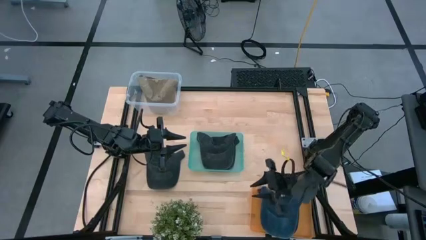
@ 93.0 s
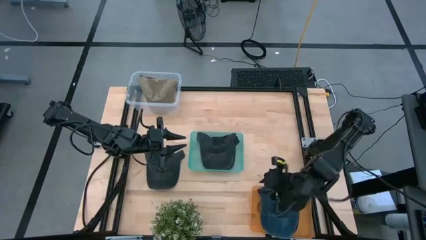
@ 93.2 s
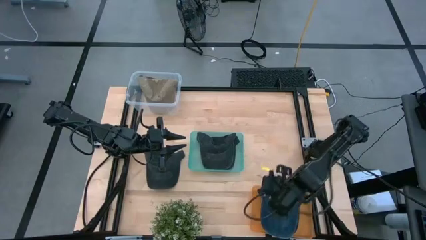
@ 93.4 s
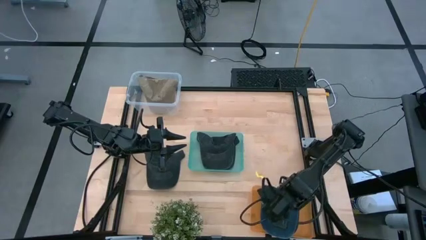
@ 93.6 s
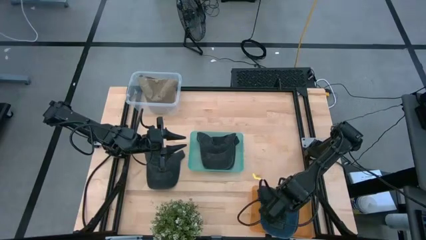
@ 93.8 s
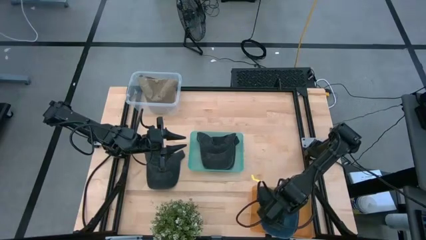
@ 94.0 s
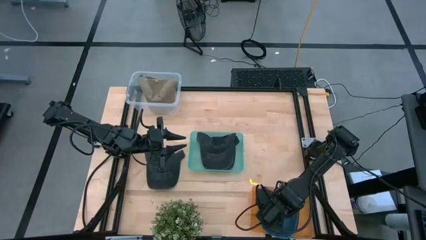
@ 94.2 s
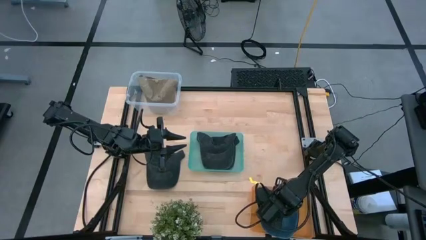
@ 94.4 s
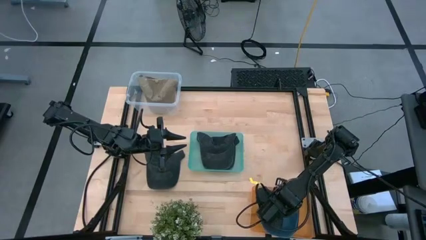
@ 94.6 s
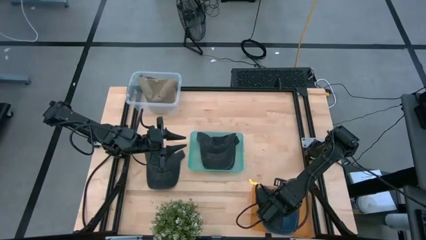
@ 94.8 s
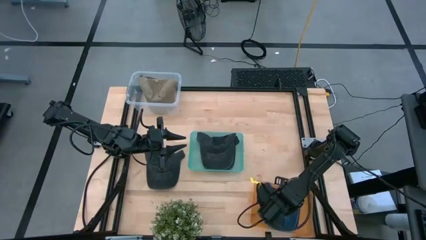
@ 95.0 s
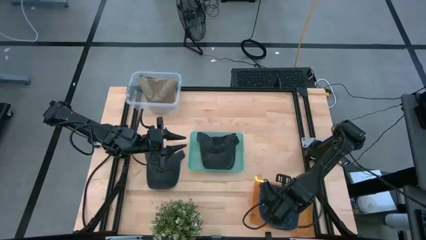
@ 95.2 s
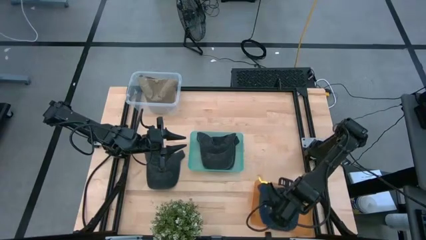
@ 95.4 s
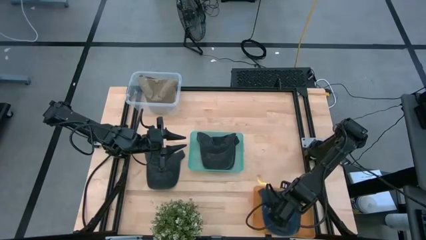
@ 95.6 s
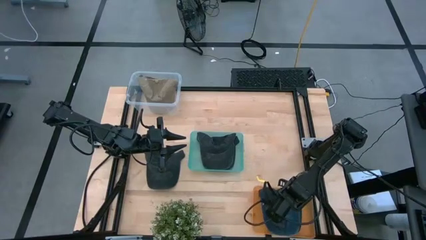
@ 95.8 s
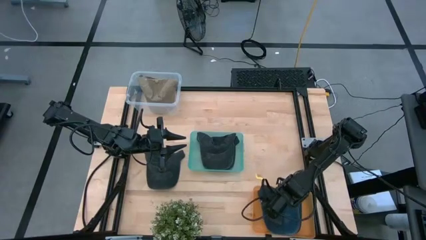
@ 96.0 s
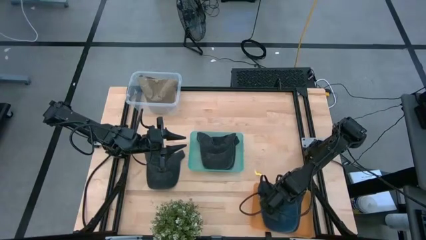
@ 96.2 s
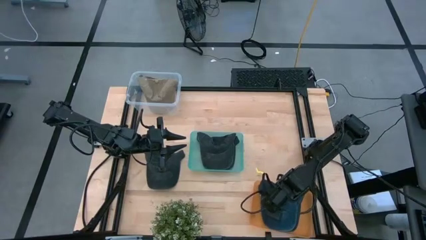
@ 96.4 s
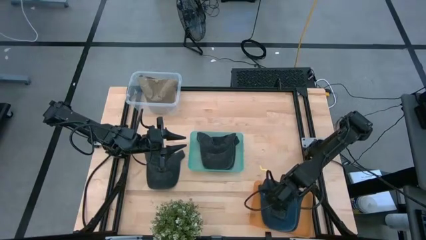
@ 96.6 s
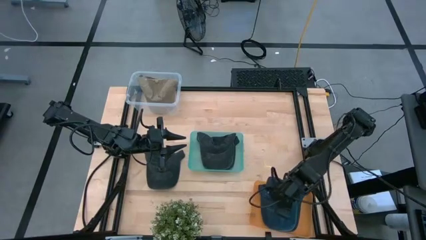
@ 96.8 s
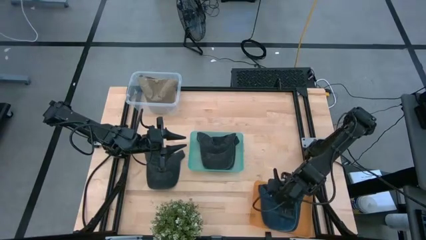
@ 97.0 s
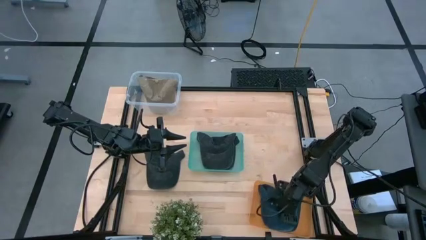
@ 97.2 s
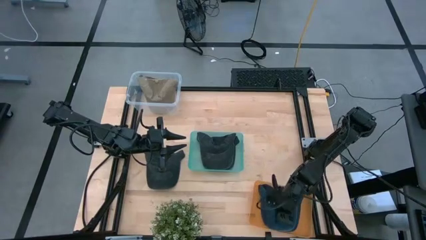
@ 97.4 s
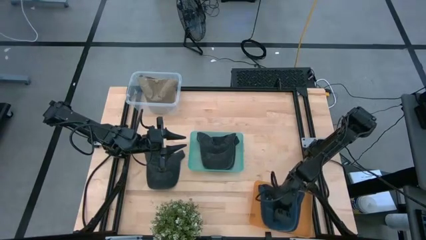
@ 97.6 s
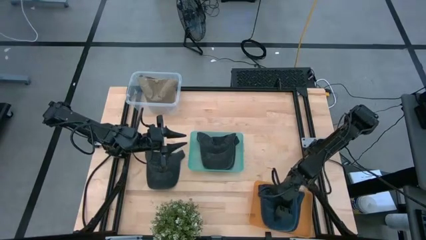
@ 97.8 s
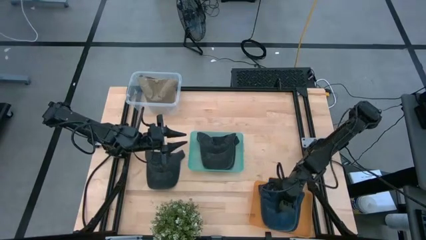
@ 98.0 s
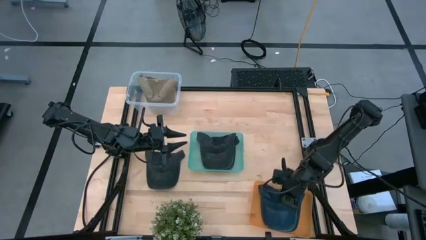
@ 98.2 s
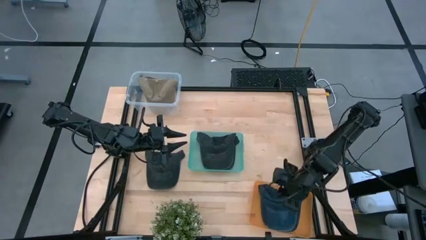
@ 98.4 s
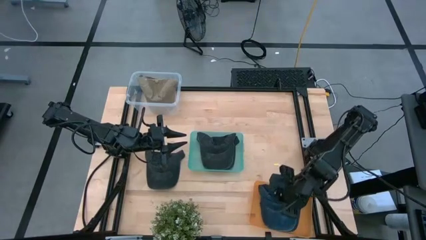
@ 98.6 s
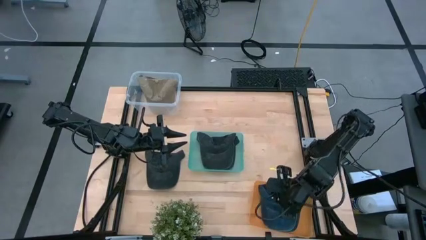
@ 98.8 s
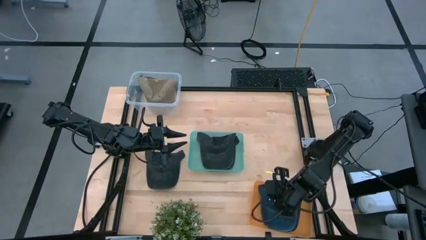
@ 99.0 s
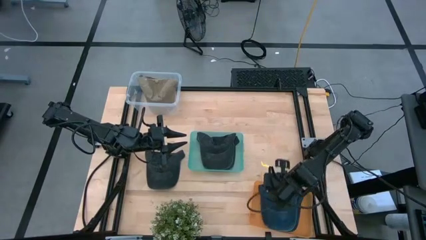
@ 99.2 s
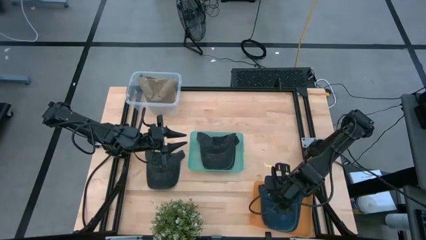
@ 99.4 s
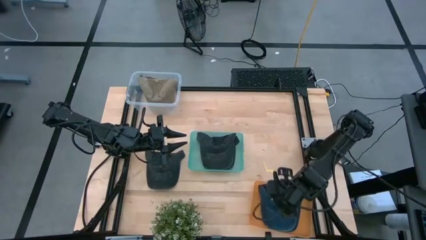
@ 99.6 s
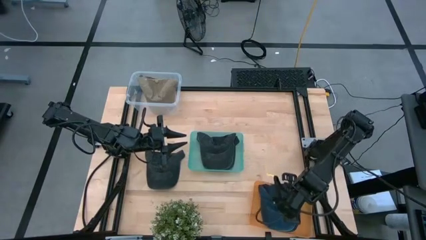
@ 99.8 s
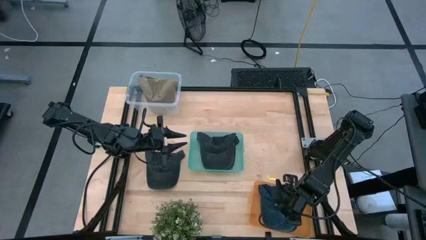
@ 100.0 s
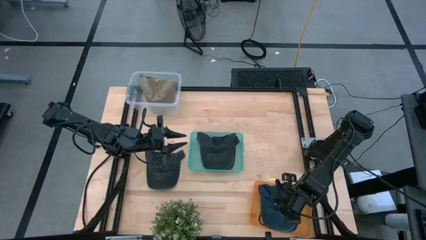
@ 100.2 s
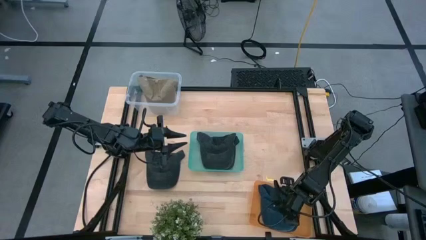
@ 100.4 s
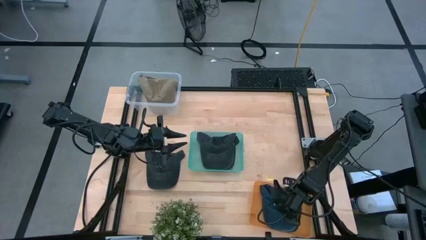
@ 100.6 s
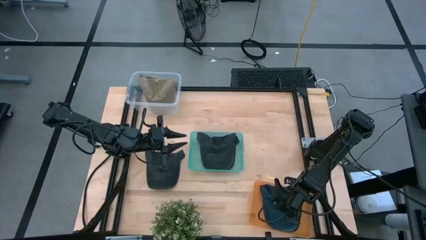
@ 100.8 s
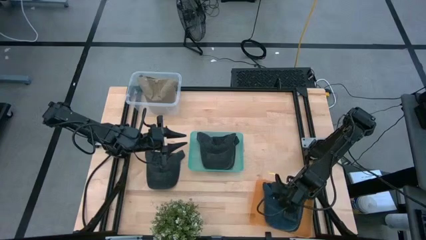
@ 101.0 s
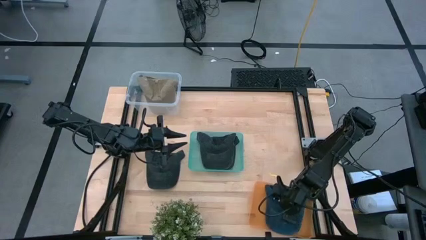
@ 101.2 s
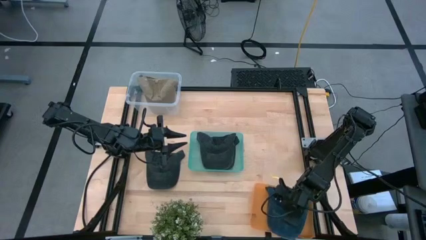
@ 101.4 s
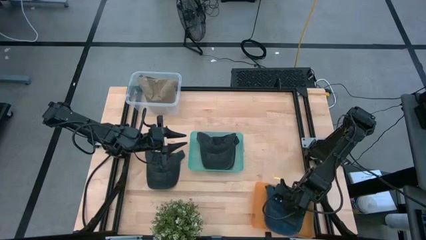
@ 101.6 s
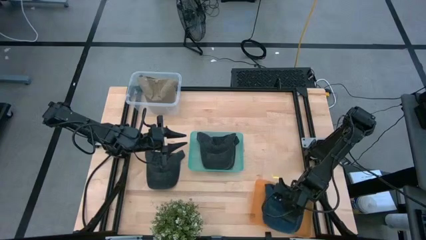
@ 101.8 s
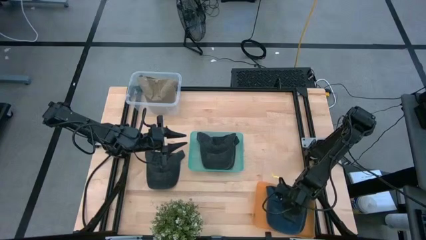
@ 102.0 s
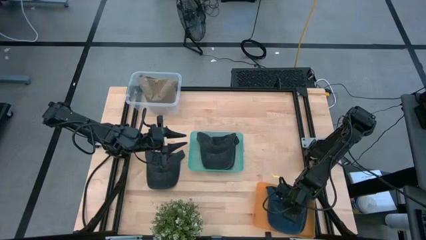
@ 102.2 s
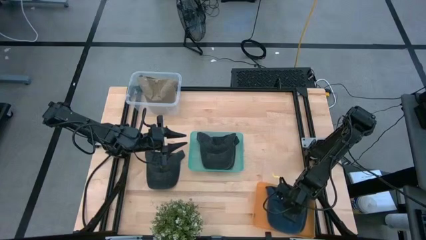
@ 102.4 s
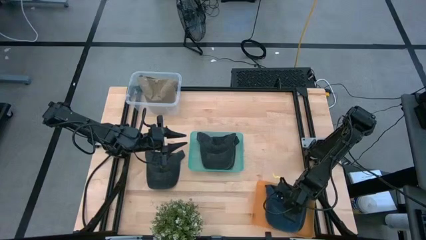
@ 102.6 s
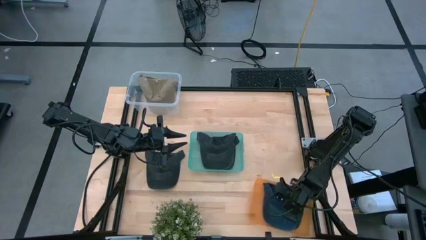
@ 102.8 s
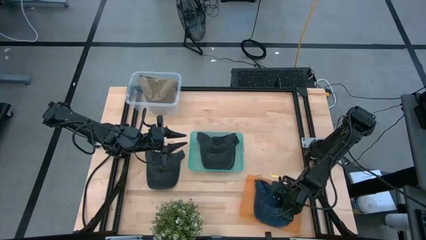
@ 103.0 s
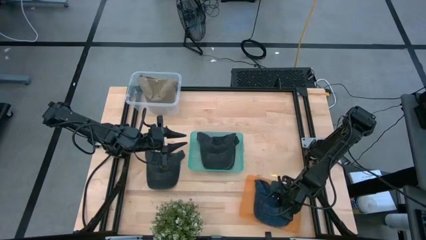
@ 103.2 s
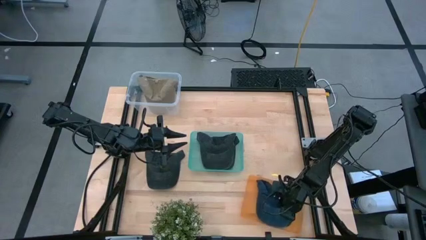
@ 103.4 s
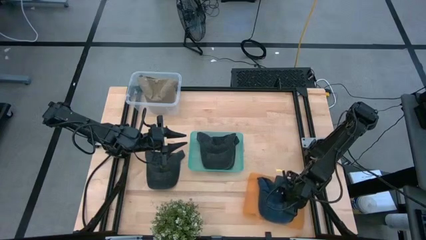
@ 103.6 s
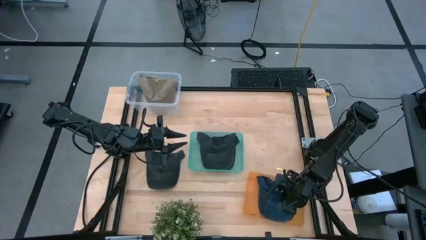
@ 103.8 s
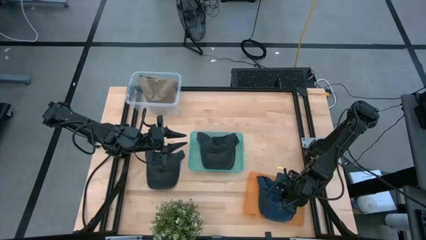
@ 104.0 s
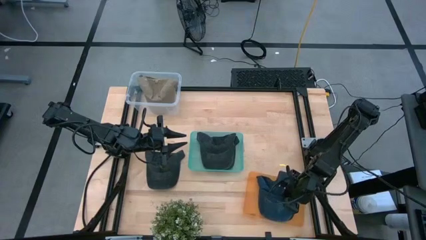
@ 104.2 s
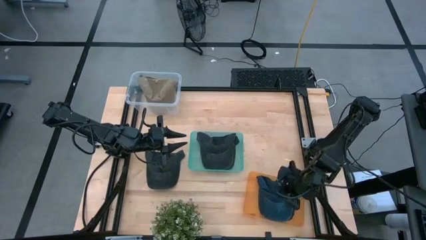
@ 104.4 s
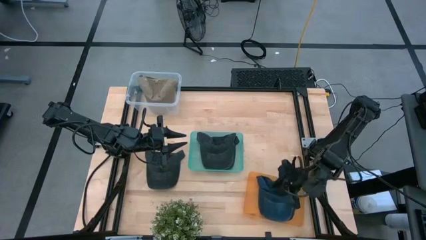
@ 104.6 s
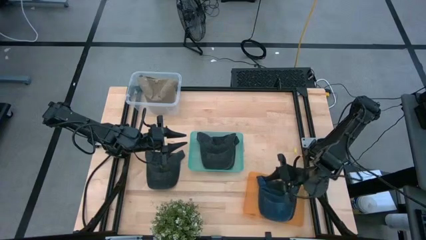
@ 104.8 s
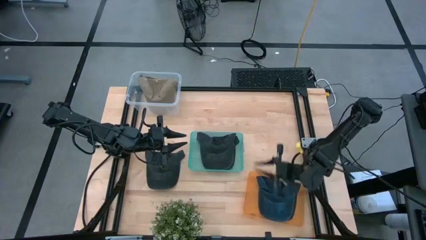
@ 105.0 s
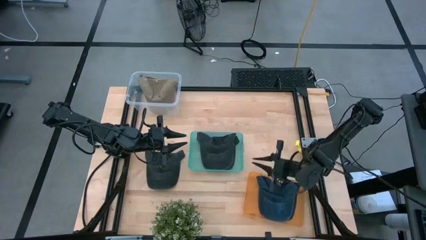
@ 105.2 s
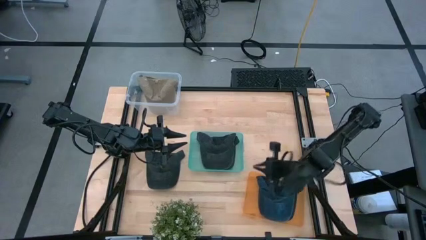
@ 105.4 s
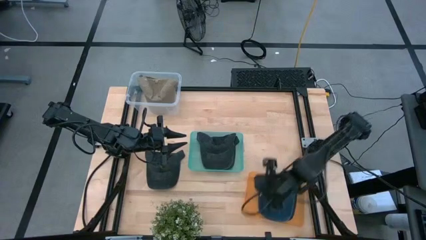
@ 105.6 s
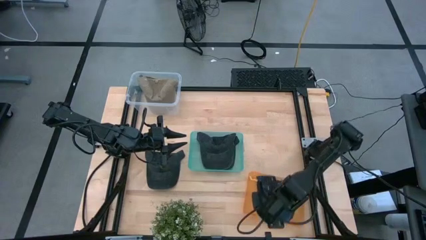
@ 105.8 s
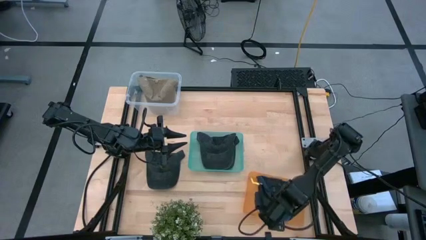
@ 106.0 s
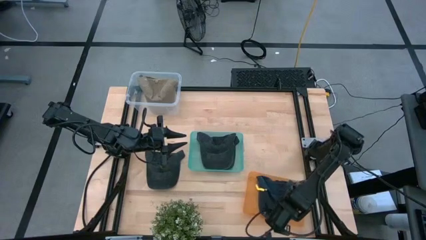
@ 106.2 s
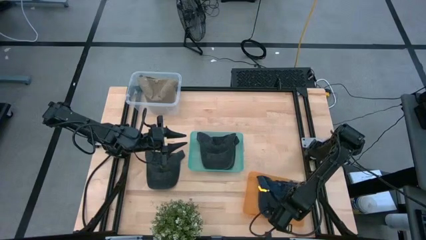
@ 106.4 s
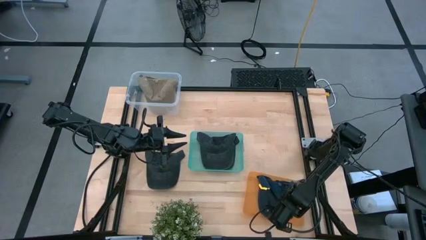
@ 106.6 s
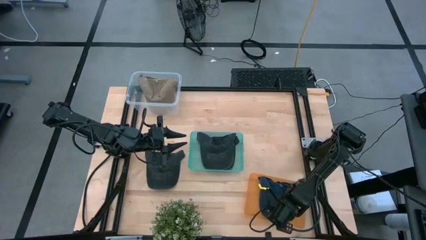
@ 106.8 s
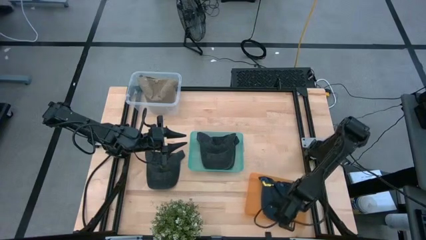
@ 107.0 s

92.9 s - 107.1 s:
Task: Pick & Place hat
Put the blue cap into the orange bin

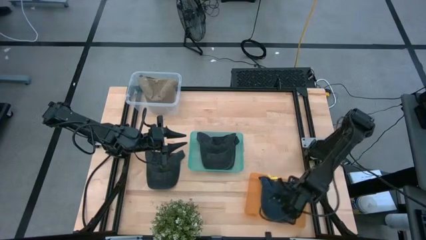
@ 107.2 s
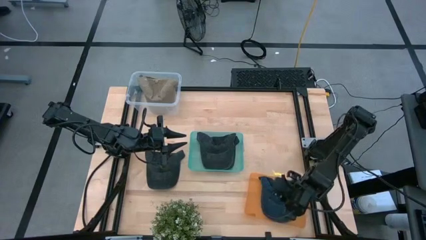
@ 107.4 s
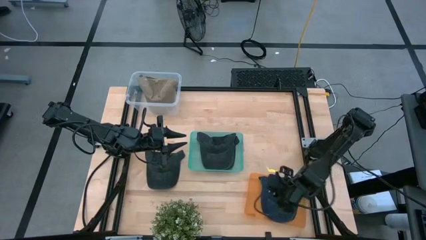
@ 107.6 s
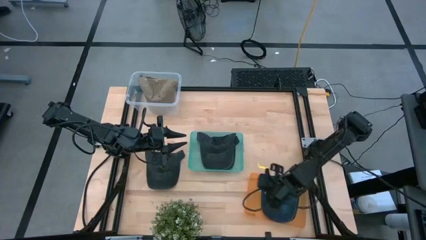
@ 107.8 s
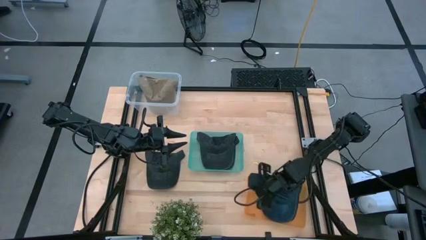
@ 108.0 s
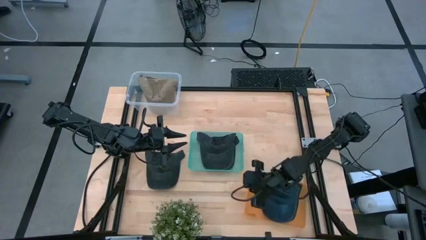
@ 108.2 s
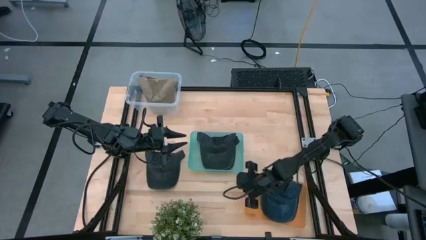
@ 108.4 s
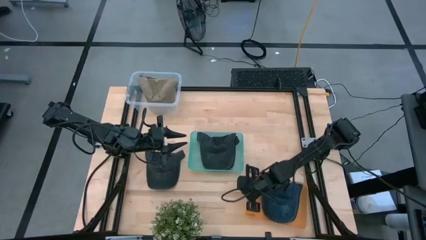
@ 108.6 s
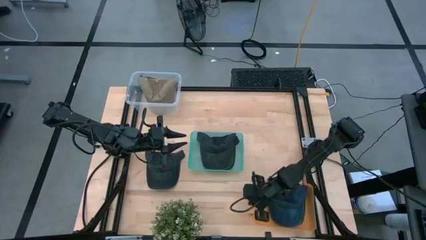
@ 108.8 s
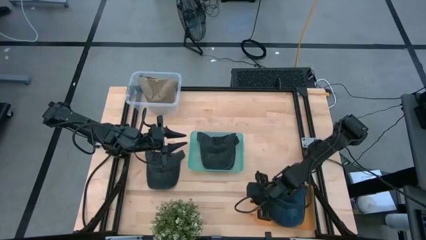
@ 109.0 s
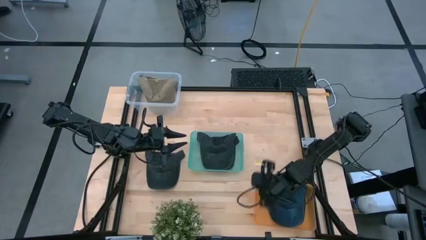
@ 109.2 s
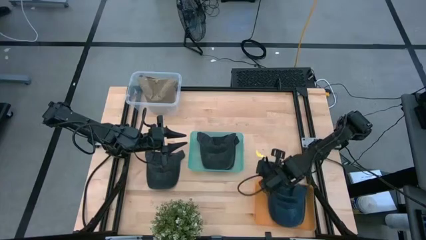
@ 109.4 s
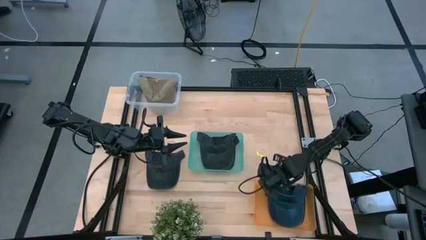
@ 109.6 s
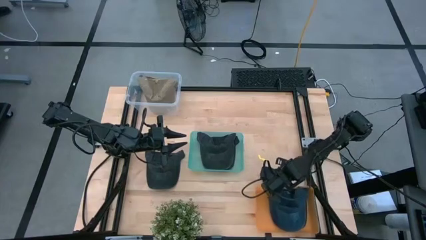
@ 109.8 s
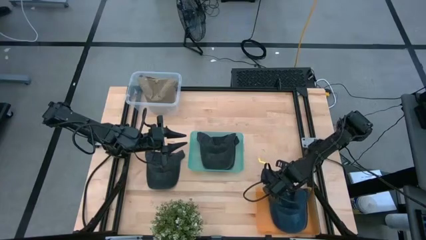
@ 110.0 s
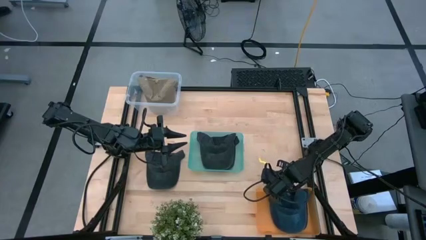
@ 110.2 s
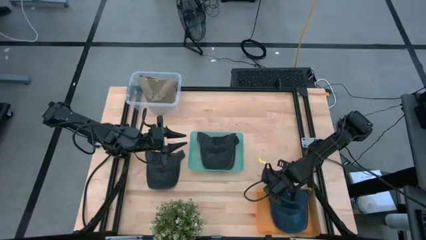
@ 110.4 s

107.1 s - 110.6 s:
Adjust the orange bin
